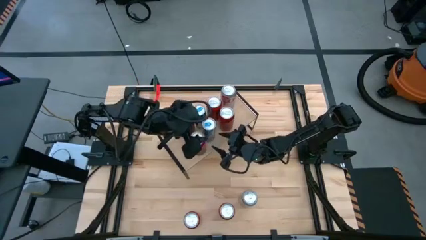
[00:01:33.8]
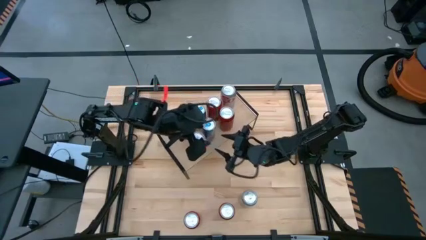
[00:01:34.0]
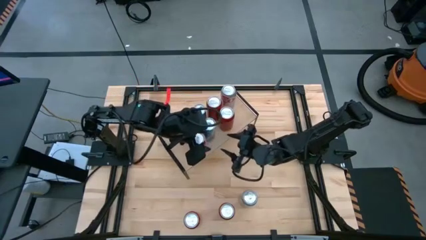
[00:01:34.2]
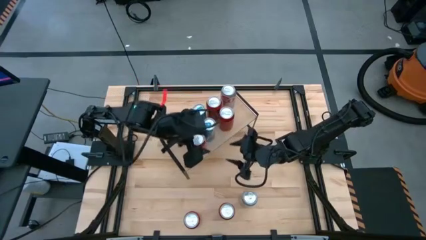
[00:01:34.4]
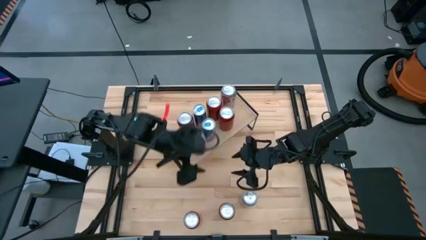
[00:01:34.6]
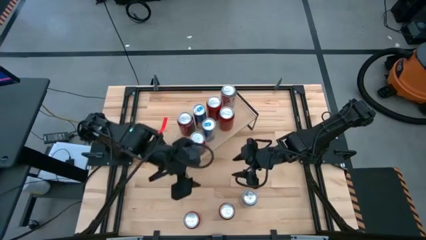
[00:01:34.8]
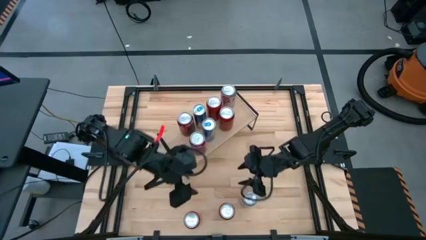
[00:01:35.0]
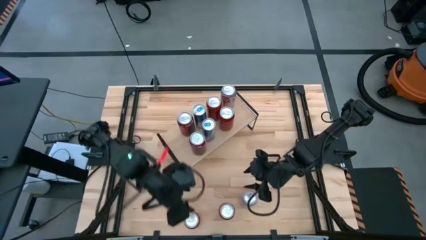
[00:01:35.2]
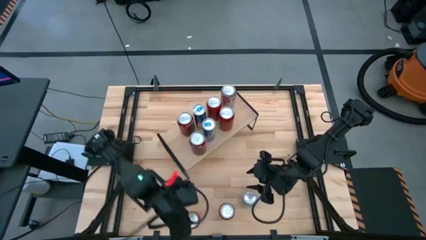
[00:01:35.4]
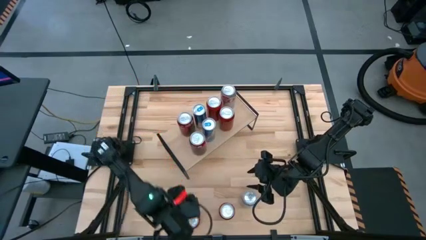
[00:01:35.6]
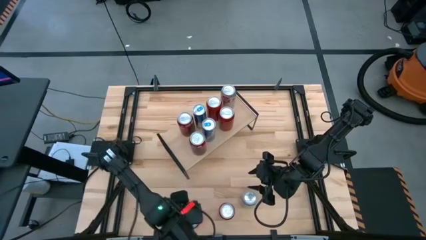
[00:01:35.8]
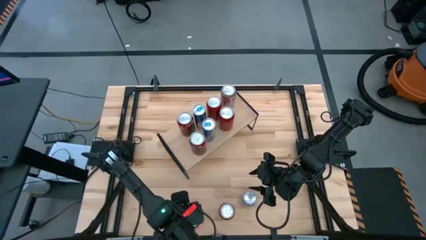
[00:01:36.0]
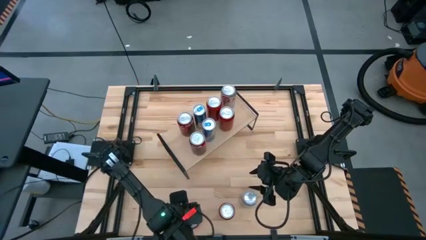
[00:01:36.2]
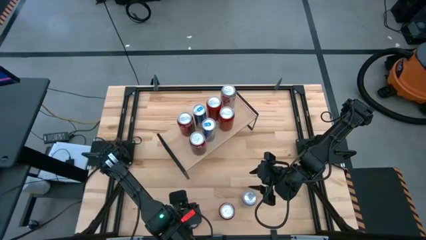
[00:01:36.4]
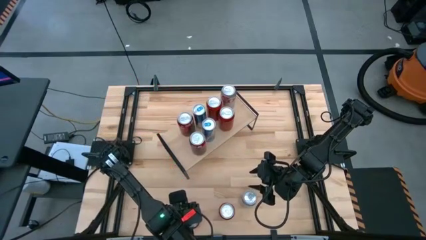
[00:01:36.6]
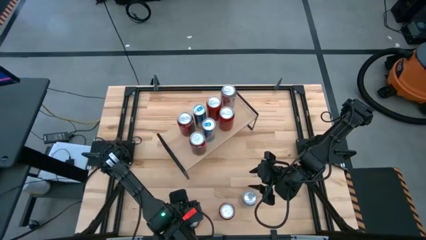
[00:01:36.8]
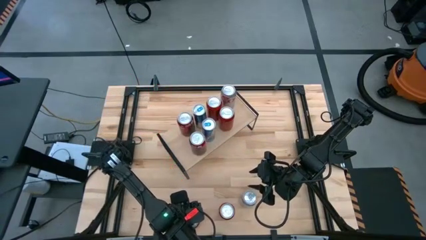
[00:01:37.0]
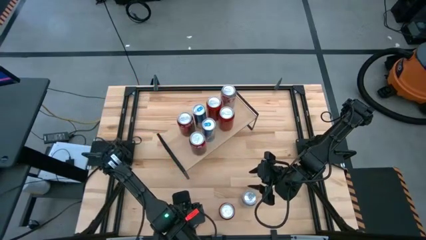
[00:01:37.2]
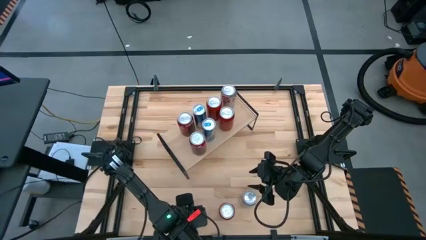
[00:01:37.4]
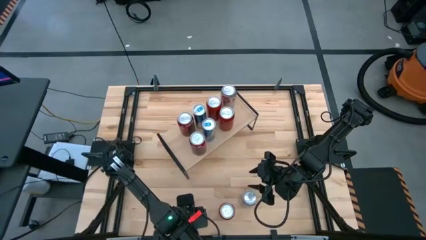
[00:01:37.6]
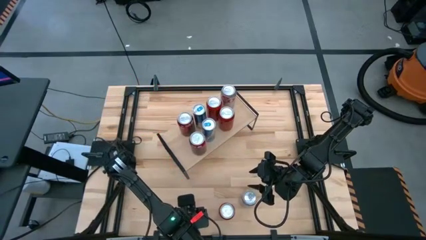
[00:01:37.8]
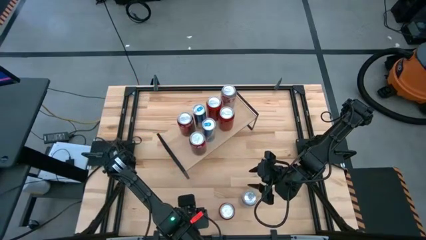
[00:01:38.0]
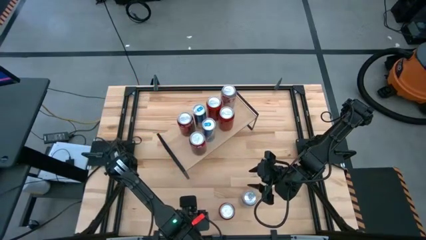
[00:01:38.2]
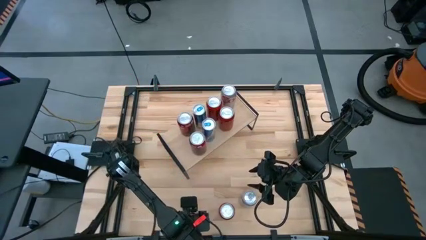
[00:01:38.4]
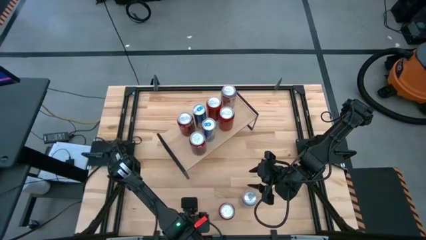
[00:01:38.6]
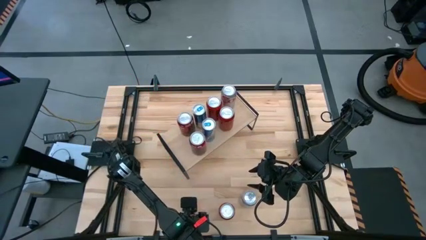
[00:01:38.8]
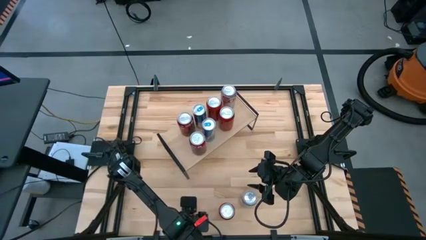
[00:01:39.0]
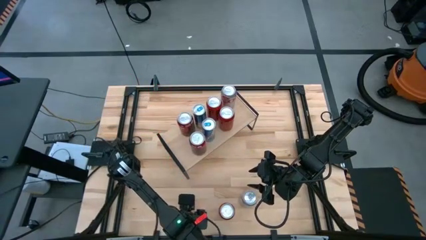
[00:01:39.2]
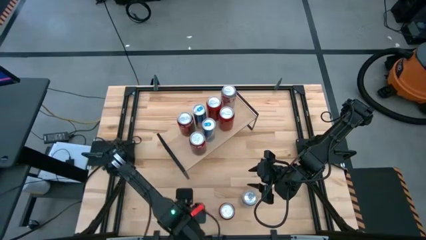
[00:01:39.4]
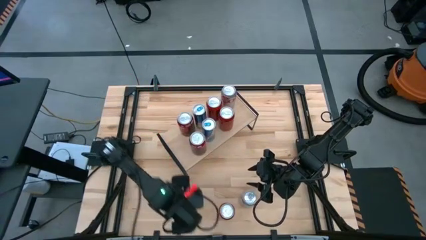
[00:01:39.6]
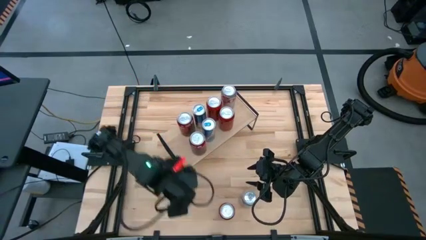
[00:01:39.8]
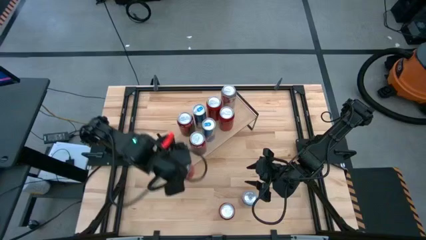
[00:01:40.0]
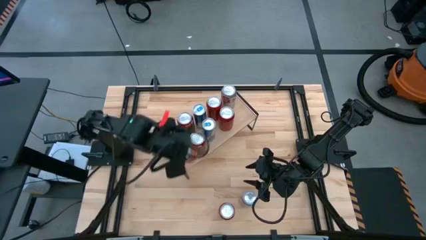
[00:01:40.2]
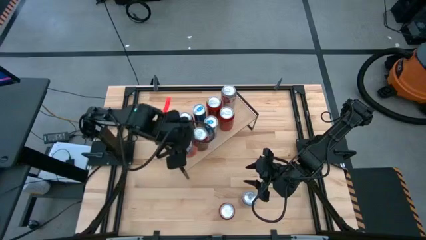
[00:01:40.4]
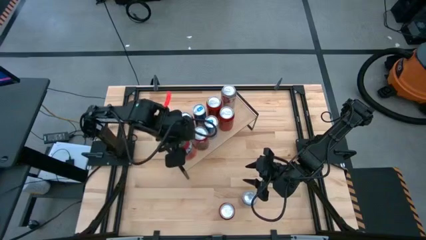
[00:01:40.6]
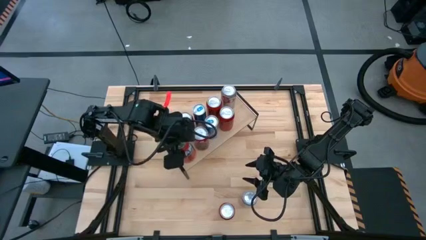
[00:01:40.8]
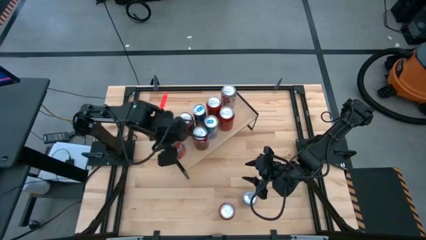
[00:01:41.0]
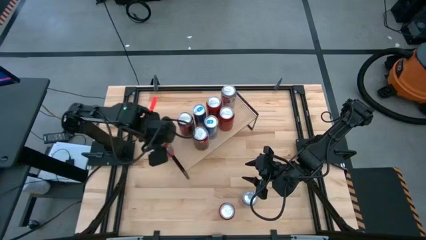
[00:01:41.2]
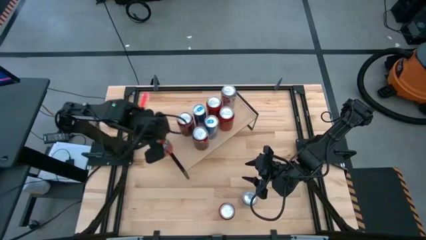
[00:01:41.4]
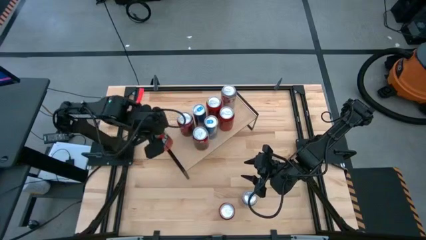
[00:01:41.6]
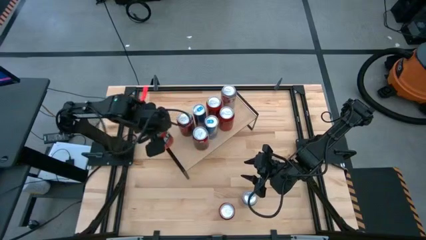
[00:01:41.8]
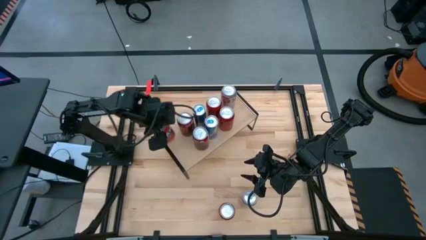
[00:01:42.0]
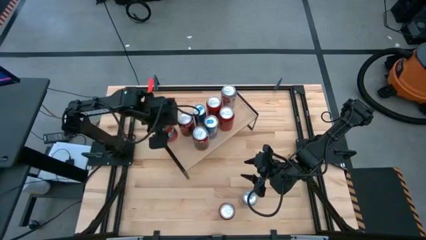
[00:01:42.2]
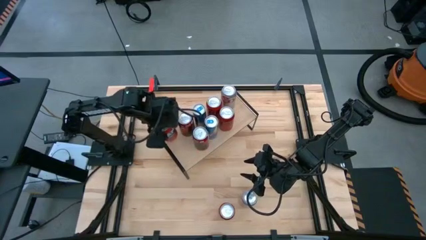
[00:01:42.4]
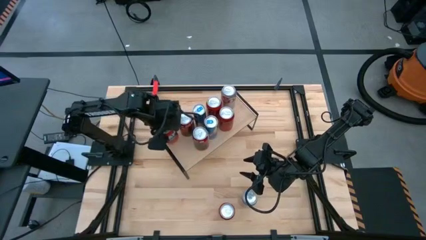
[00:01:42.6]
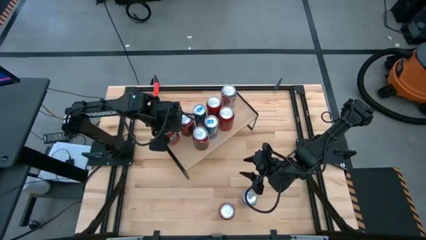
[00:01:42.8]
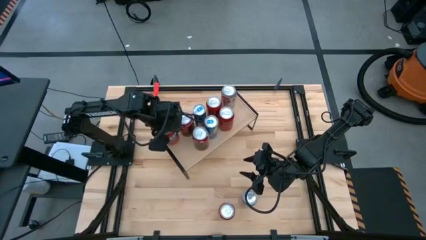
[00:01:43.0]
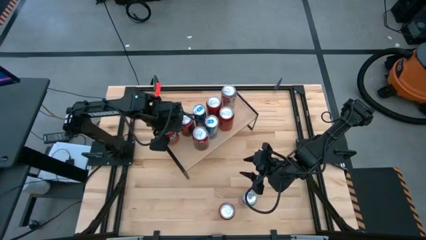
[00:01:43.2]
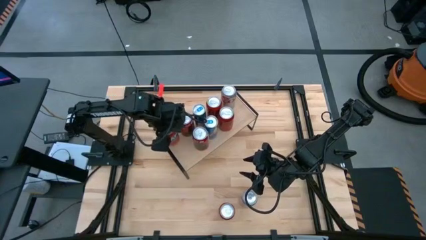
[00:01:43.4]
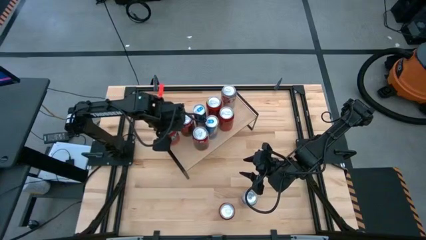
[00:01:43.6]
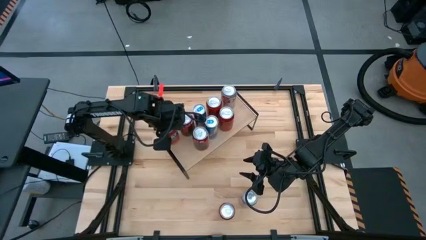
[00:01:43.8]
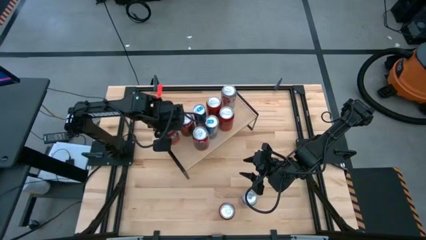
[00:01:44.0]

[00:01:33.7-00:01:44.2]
Task: Place canned beverage on shelf
Put the left red soda can on the shelf

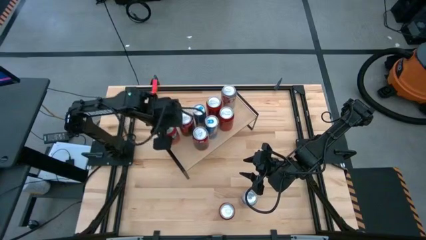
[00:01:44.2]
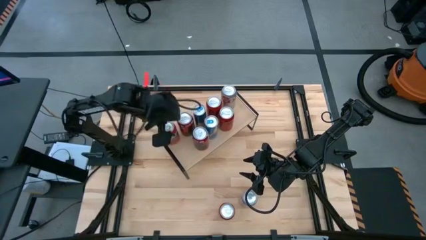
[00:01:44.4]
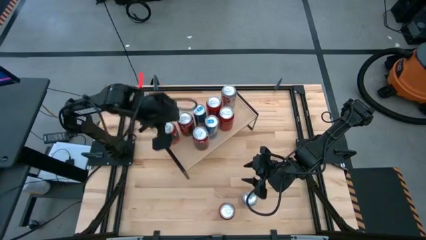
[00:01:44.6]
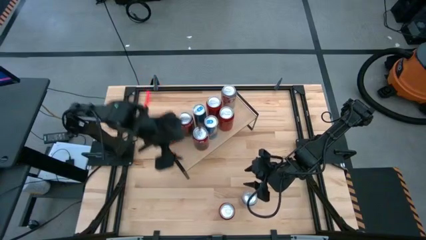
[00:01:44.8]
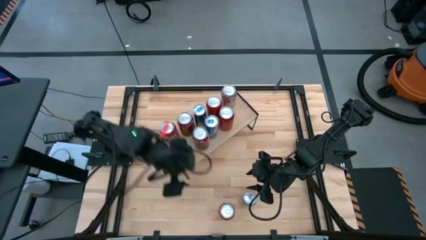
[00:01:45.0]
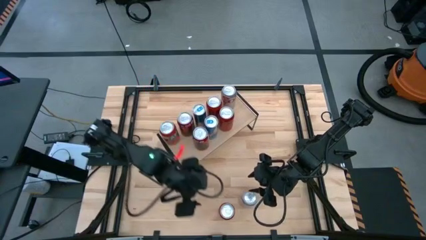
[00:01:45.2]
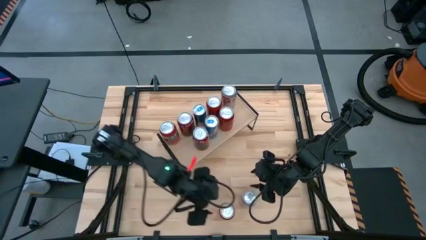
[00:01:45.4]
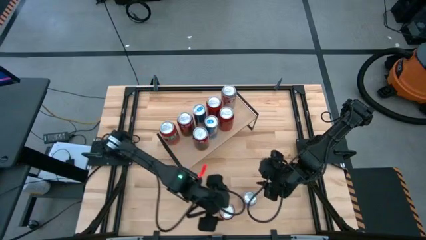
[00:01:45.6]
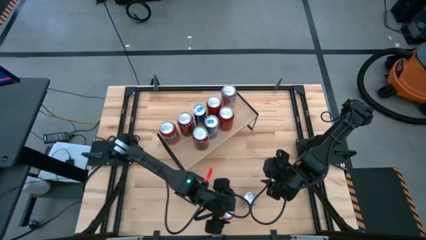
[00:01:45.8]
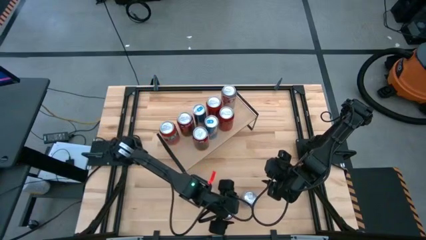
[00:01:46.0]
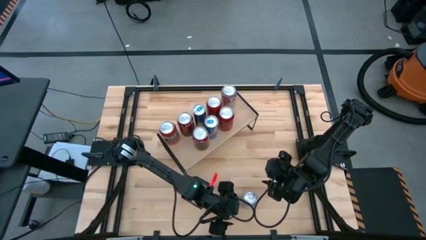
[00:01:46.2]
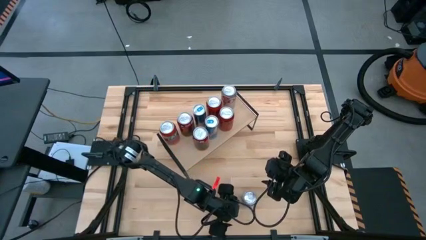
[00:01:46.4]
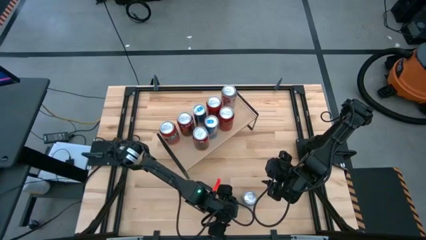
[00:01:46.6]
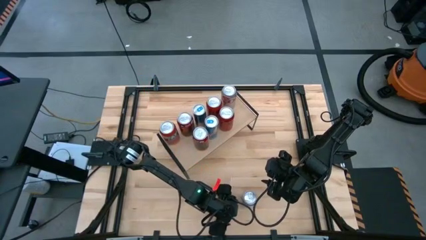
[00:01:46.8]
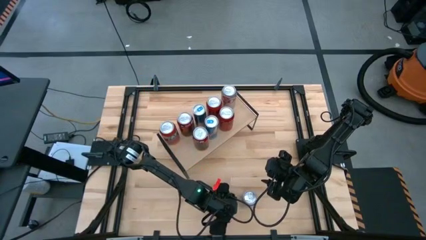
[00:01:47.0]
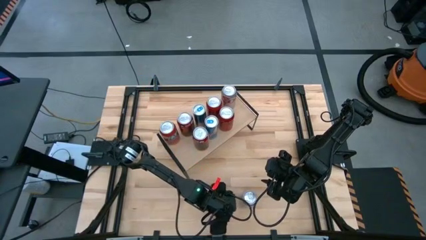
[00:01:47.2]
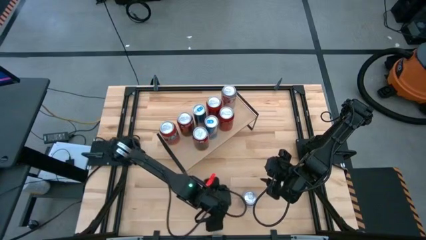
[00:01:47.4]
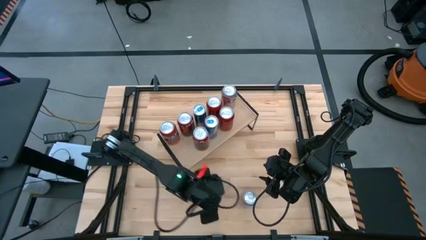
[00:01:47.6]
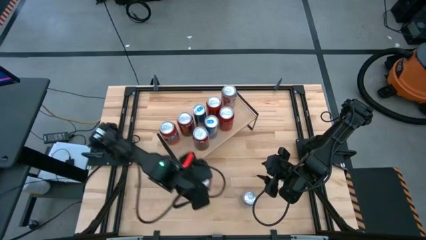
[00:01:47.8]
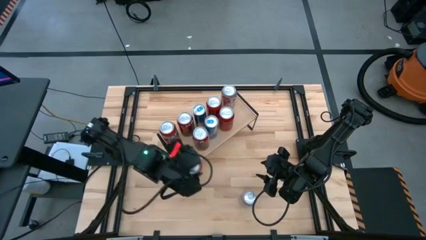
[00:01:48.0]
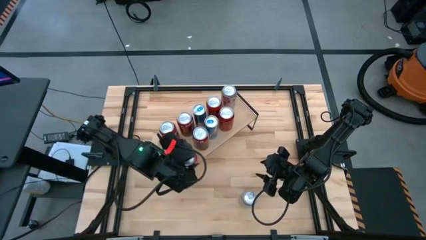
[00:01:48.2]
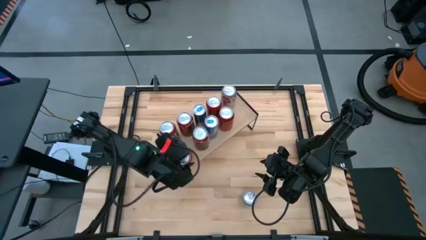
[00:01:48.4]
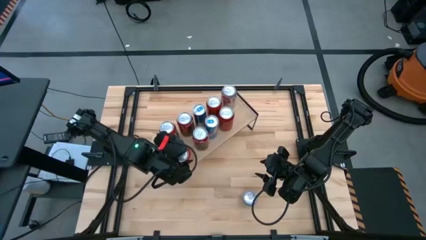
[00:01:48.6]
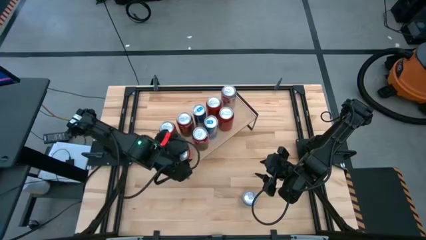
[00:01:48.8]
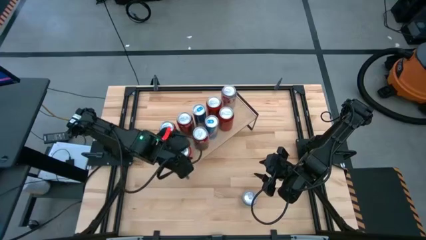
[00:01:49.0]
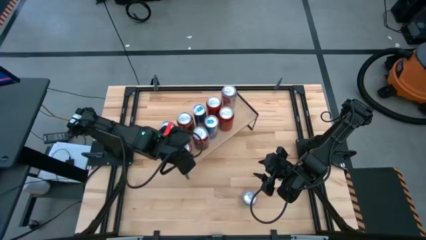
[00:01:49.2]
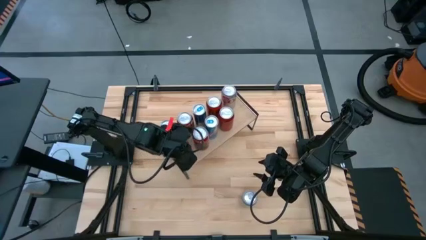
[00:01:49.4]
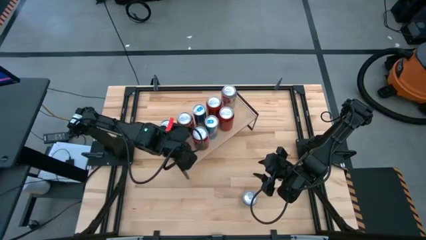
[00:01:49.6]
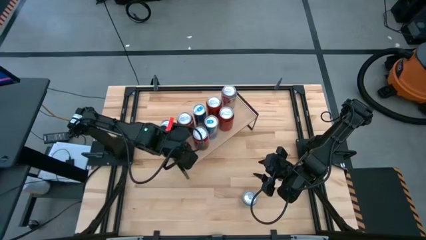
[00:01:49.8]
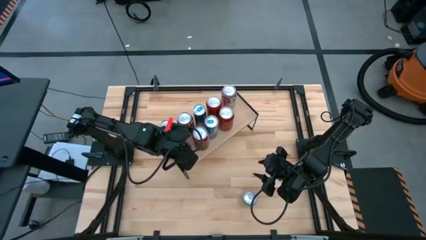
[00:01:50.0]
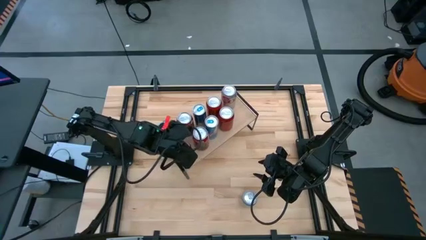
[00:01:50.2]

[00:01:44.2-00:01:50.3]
Put the red soda can on the shelf aligned with the other red soda can

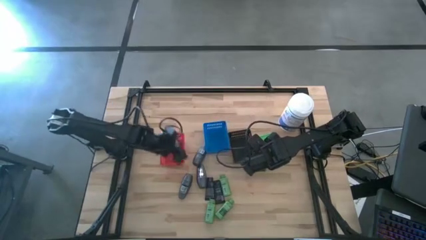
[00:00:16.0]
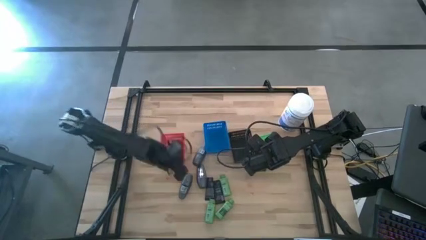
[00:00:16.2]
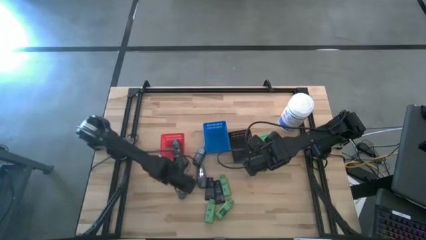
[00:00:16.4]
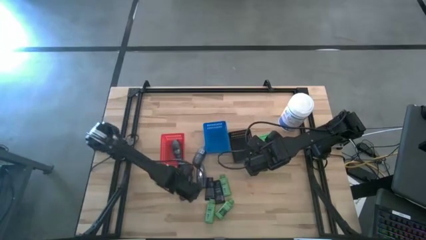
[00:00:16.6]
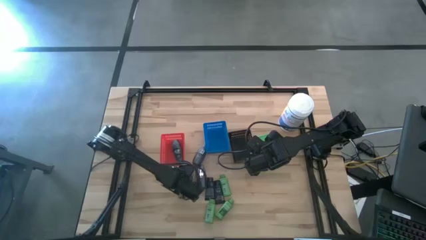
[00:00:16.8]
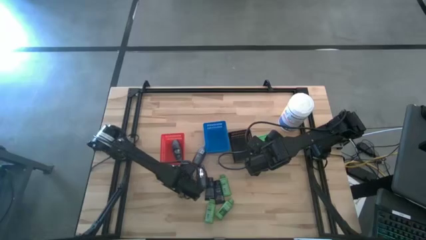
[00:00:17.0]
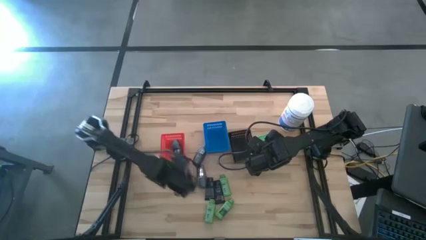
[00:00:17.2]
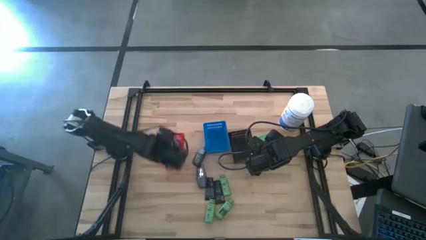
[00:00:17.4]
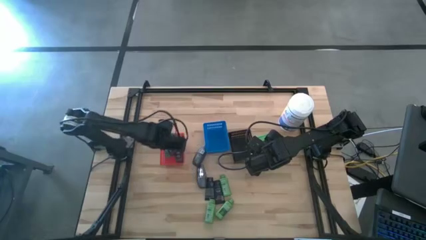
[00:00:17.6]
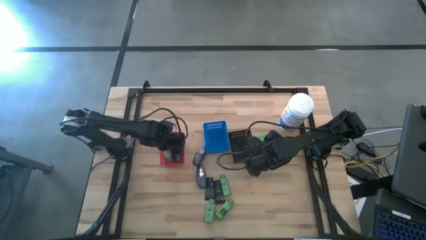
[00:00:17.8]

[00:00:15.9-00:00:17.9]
Task: Pick & Place Travel size toiletries
Put the black deodorant into the orange bin
